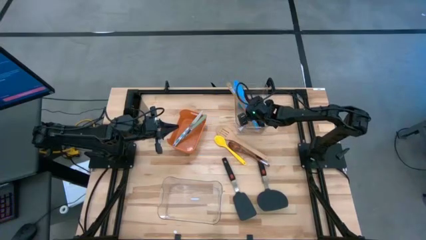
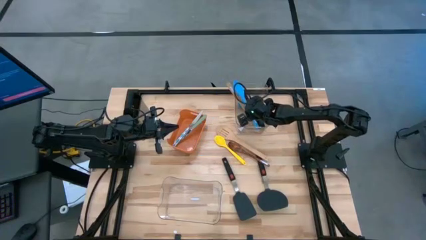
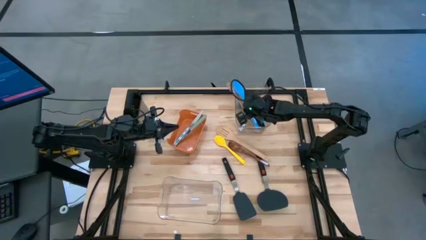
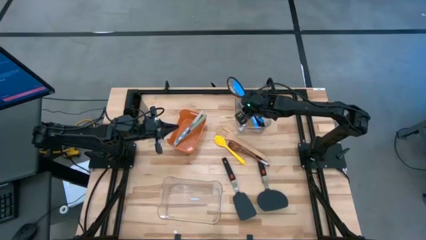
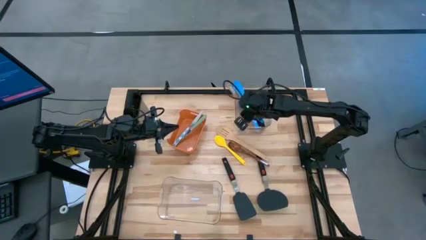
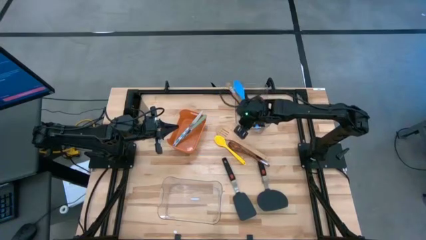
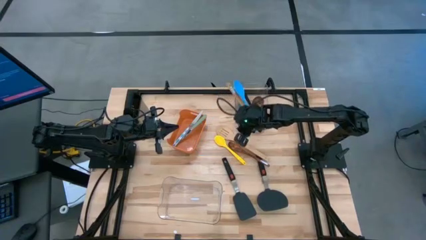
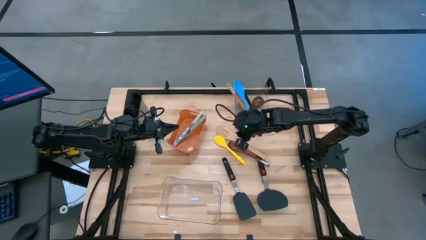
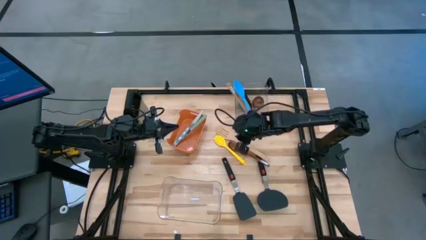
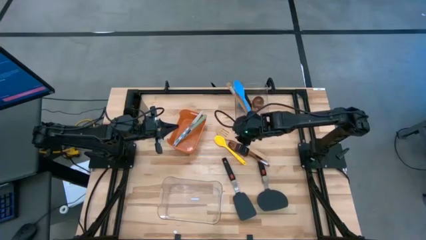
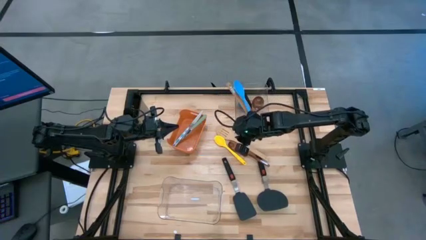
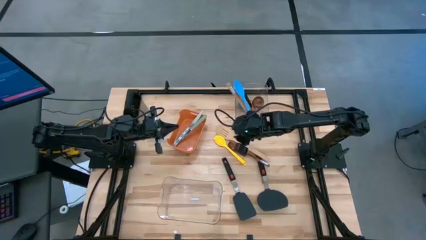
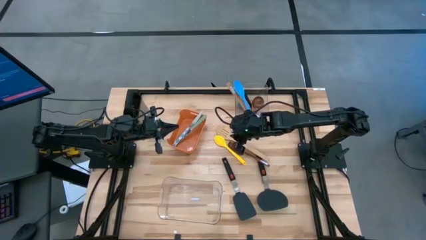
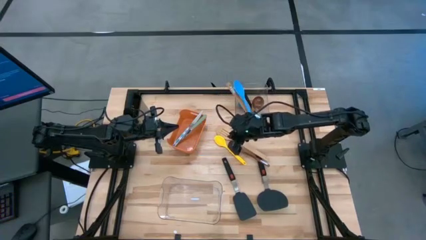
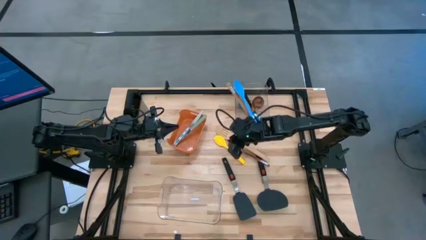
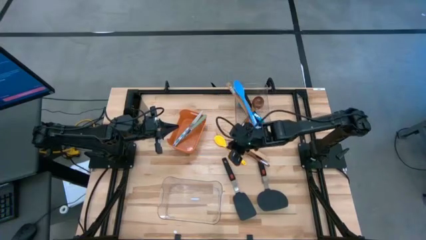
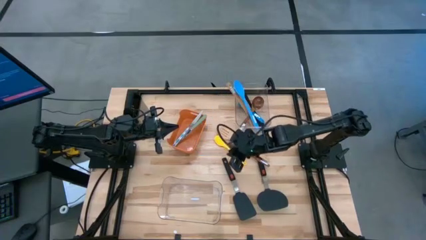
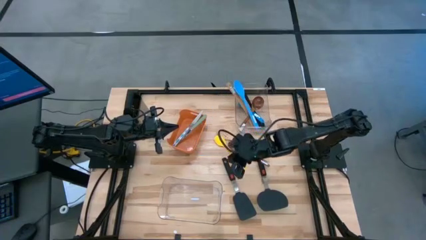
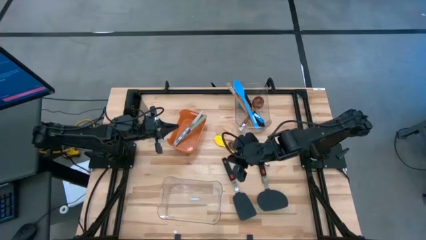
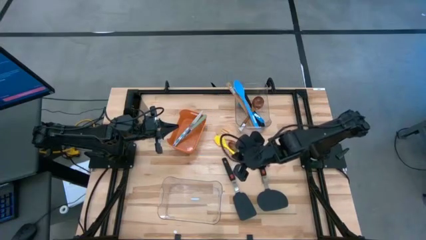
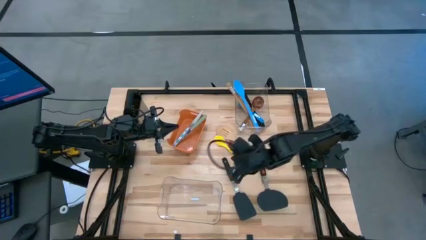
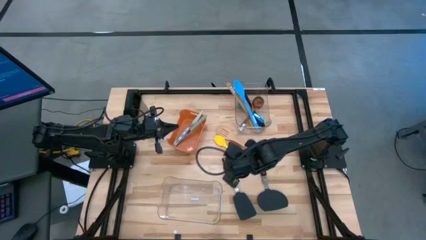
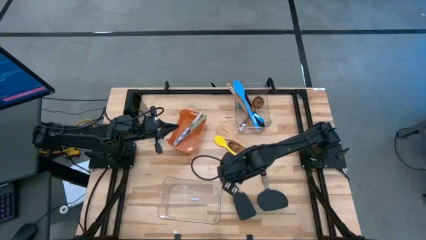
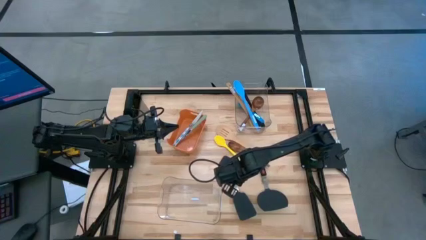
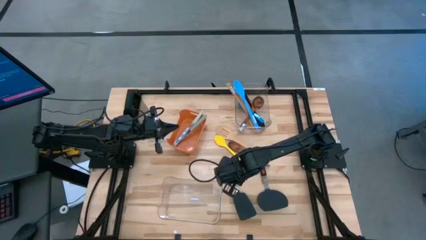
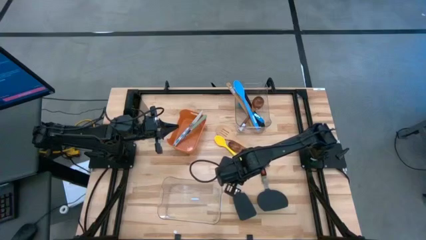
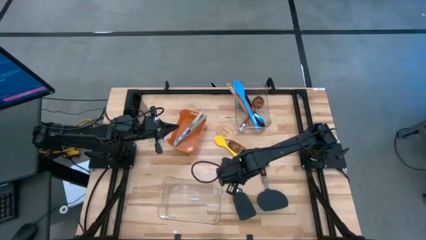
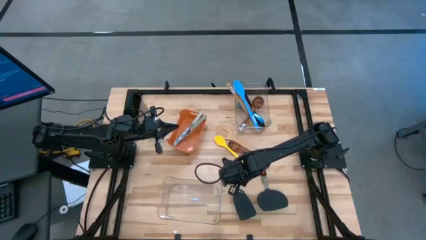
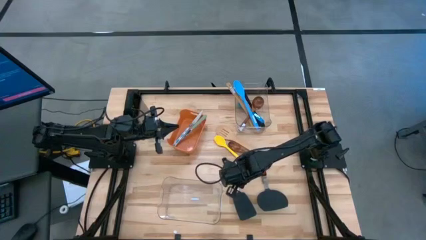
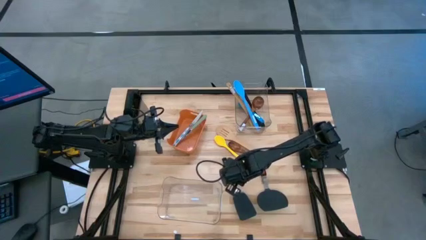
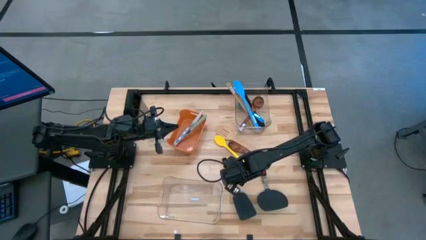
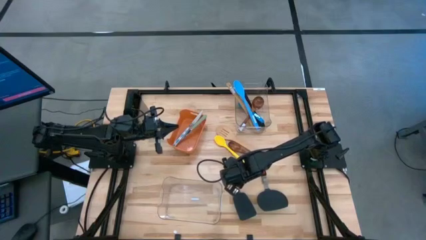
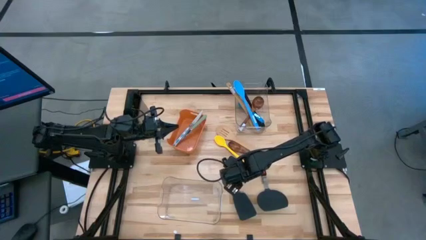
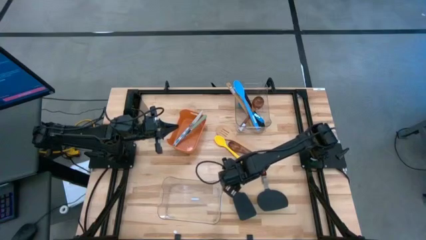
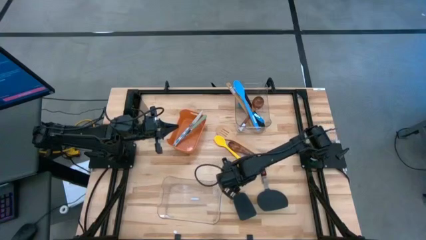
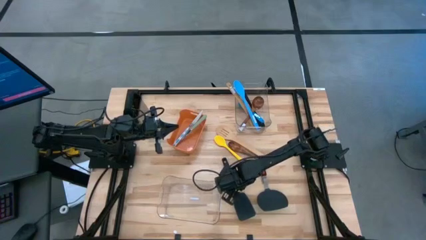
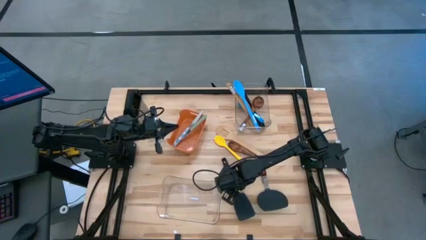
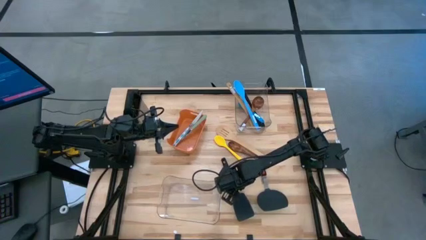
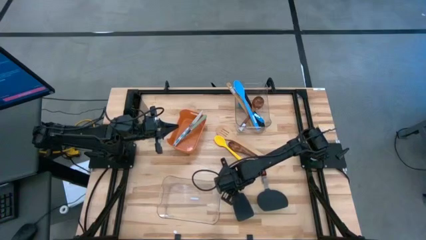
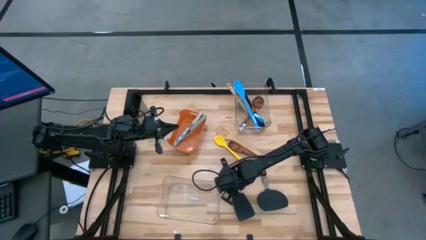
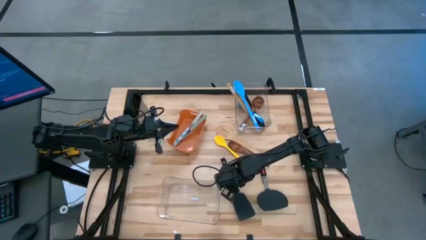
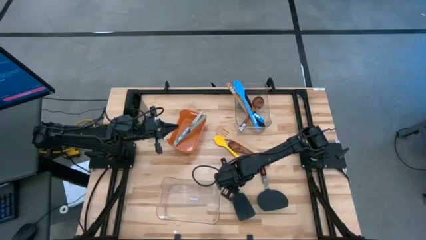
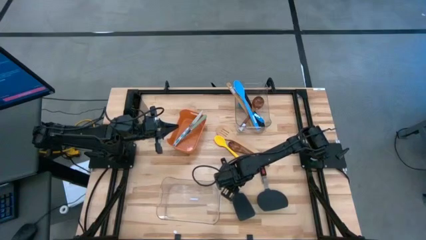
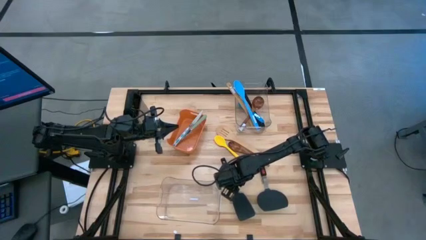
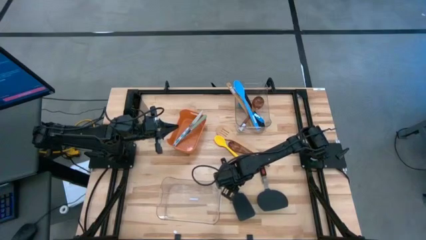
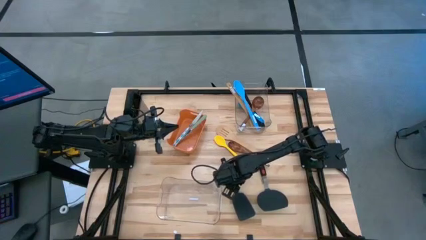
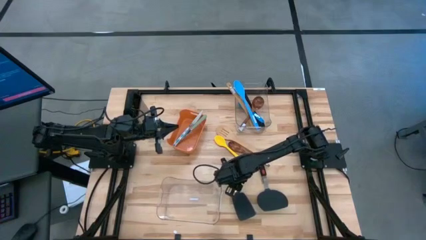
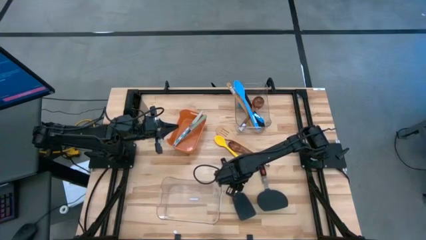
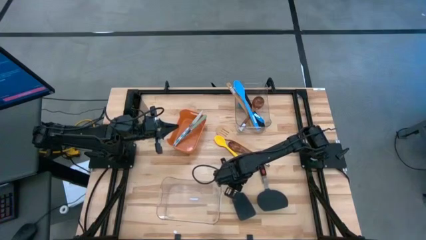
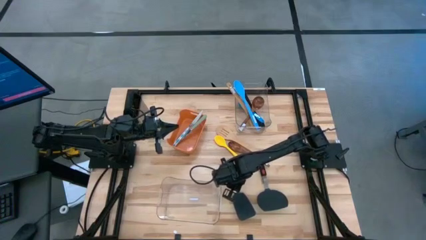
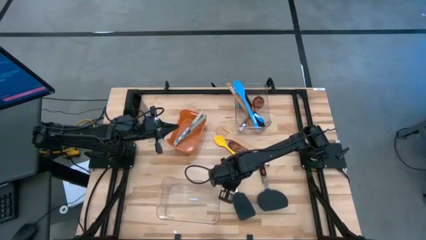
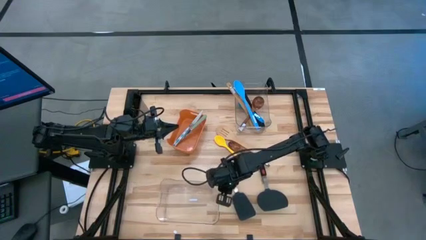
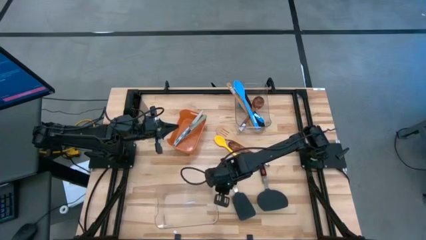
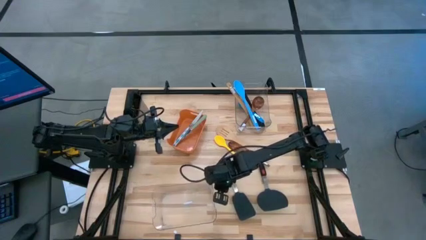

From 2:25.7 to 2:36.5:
Task: Pick & Place Kitchen Items
Adjust the bottom transparent bin

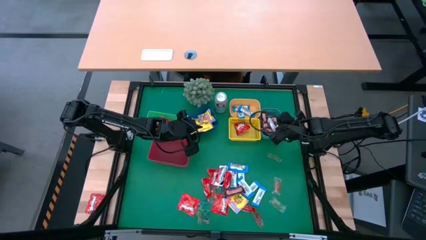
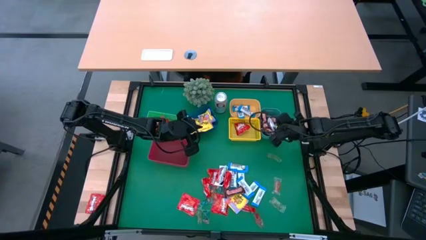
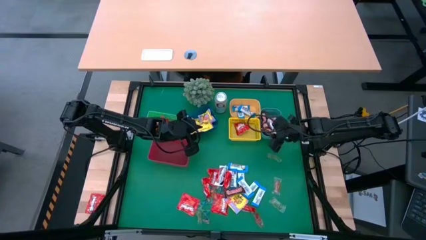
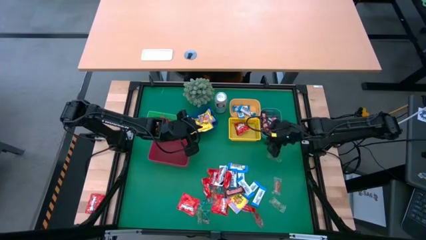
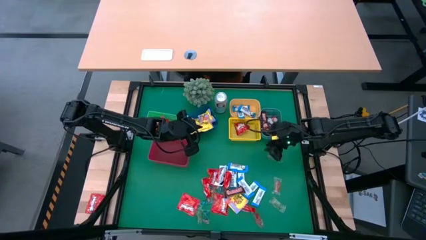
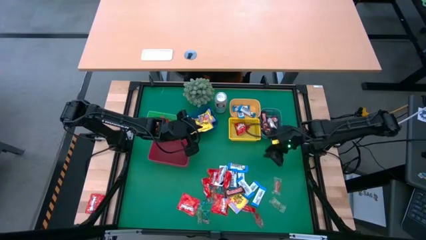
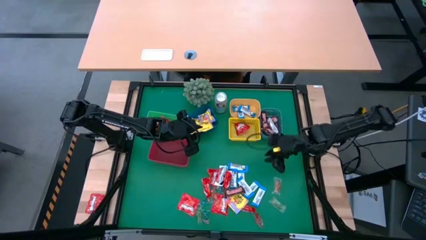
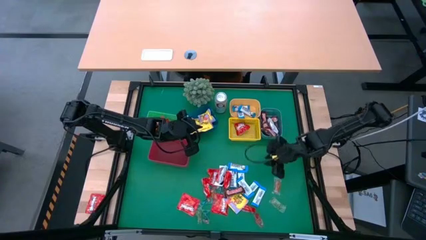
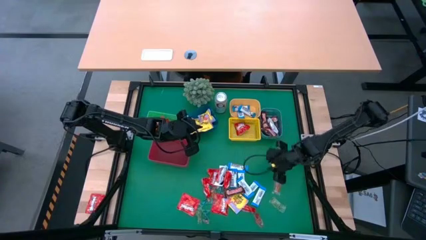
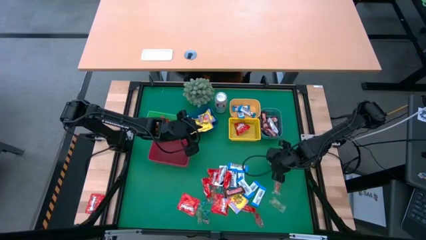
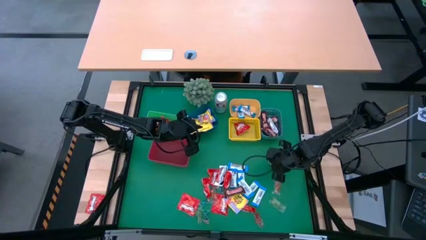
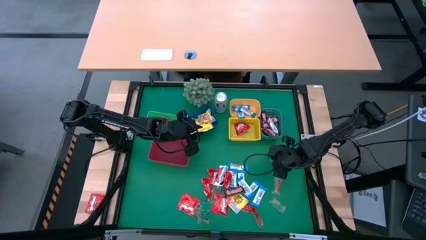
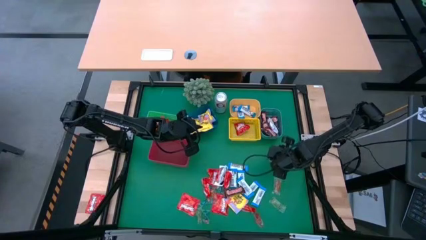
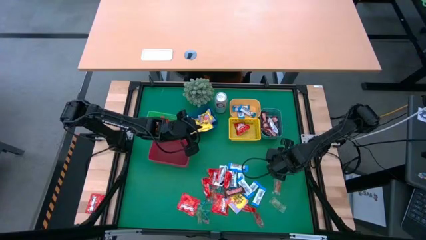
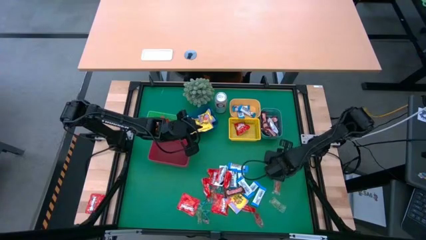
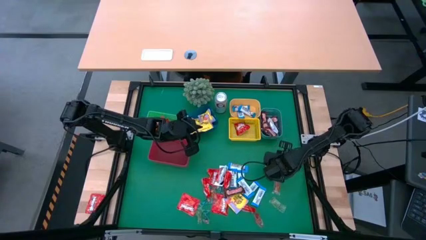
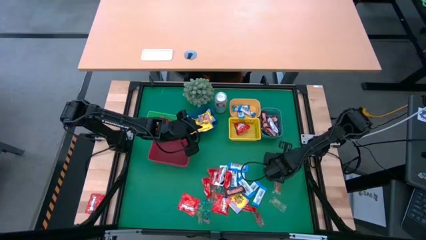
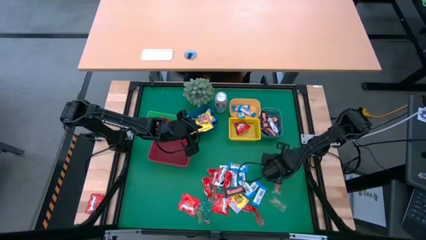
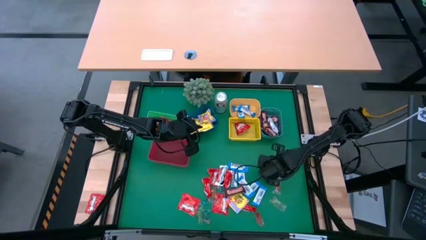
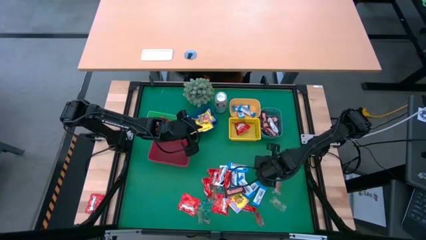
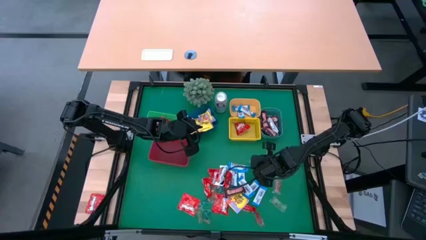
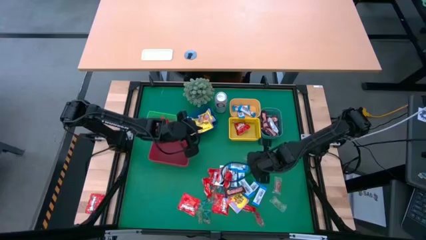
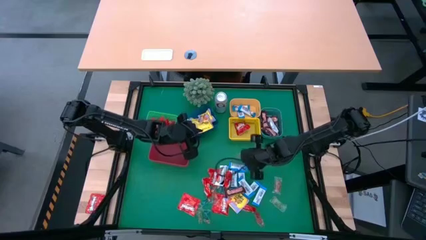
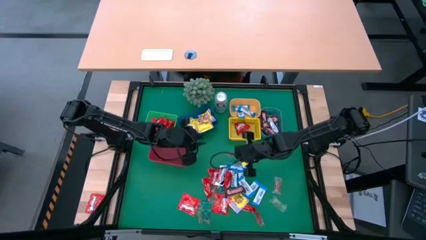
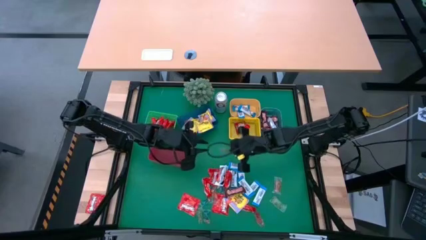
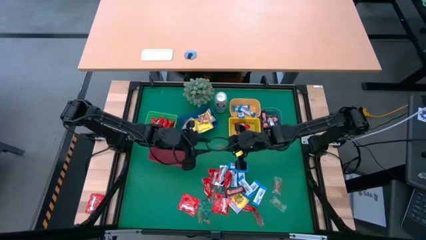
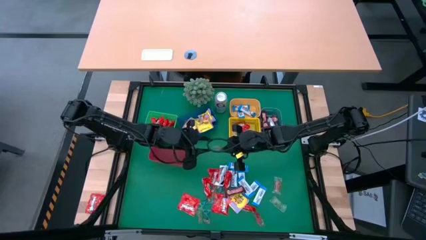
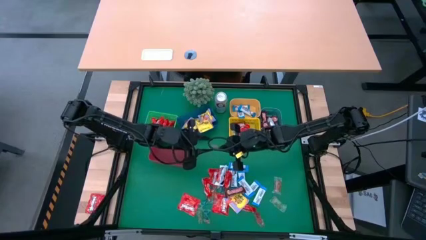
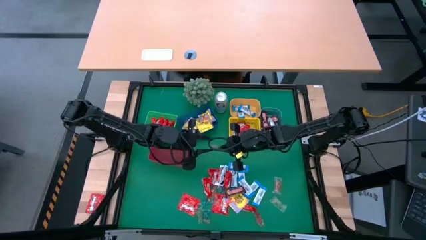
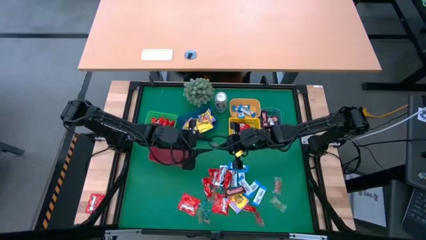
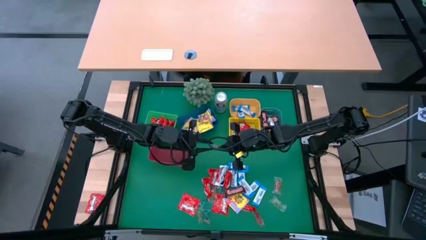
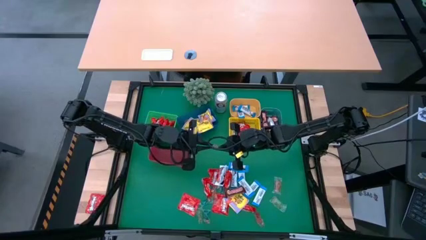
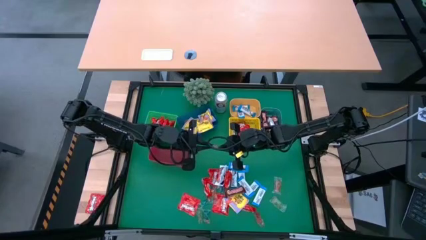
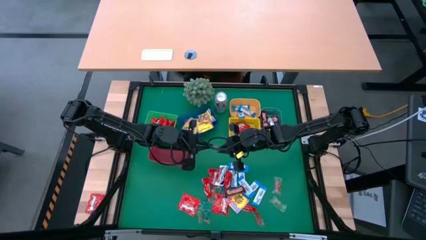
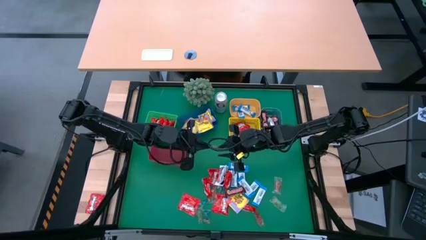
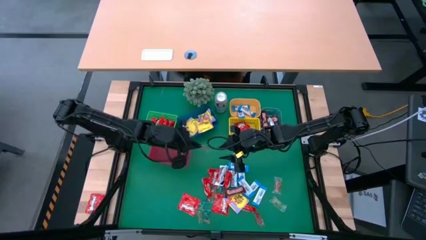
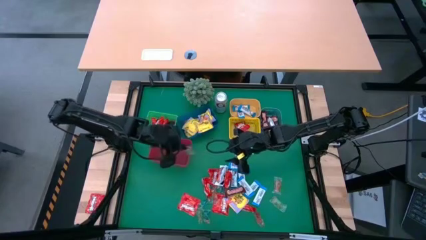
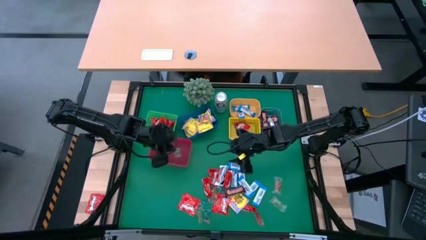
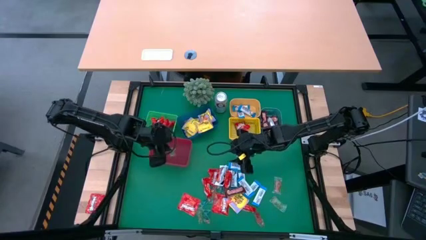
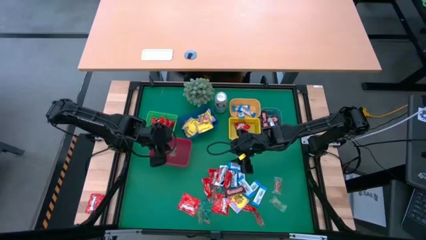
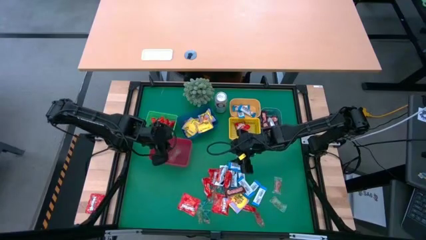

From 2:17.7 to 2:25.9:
Task: Sort candy
Put the transparent green candy pack into the red bin
